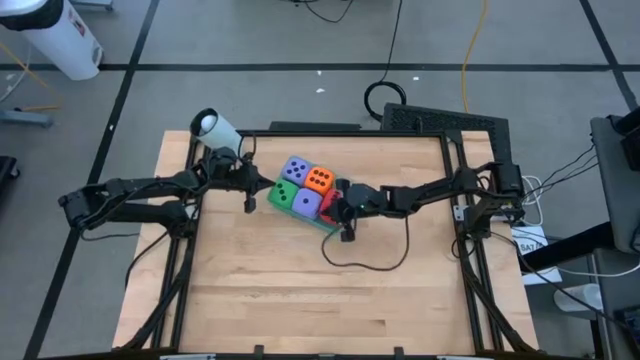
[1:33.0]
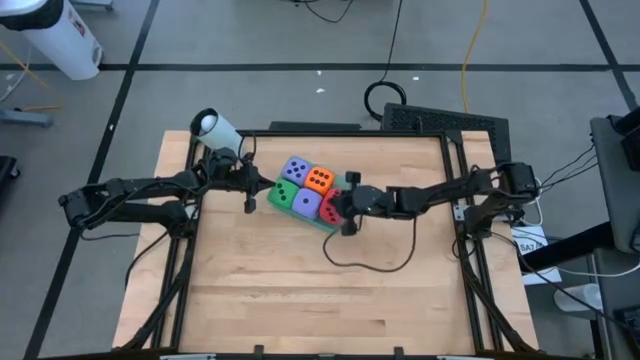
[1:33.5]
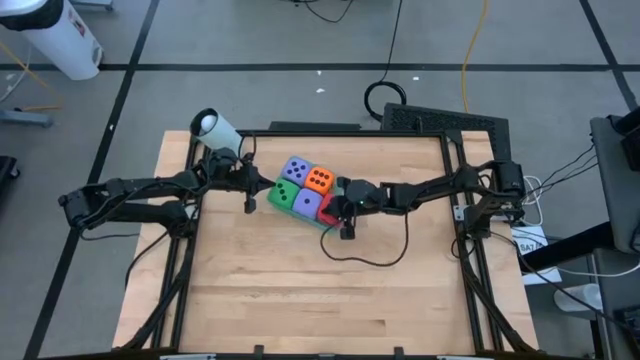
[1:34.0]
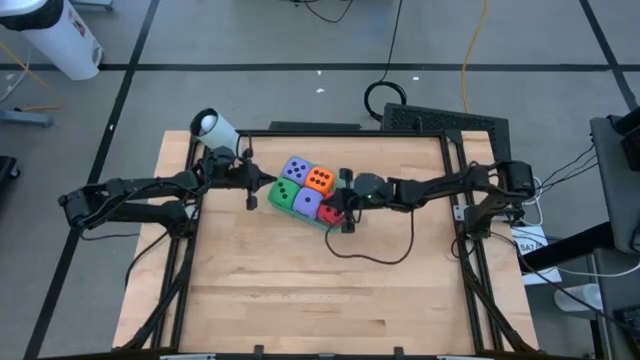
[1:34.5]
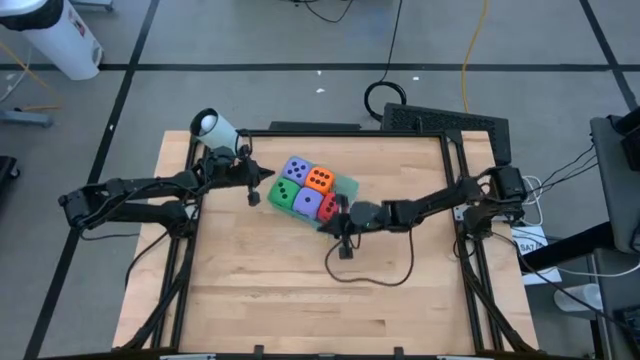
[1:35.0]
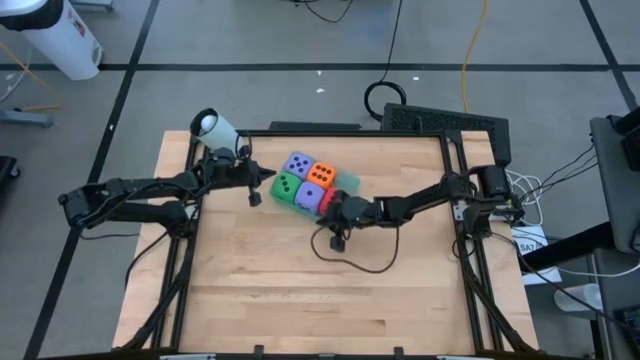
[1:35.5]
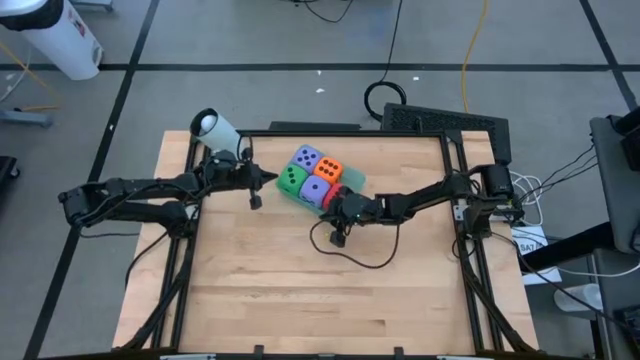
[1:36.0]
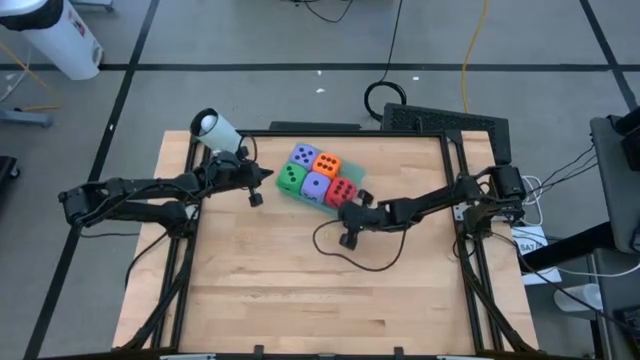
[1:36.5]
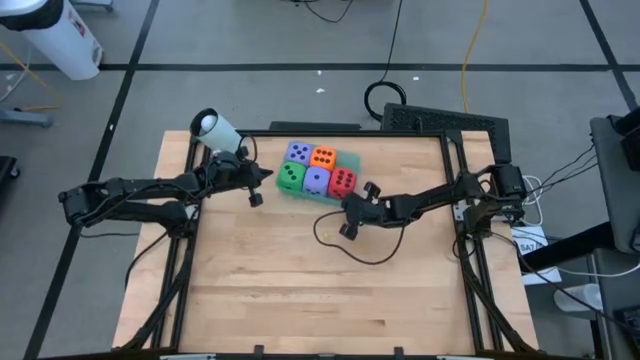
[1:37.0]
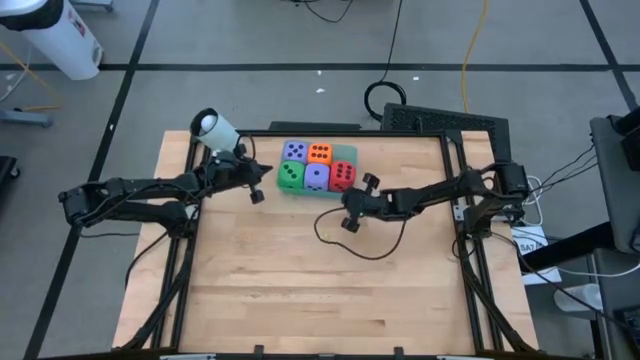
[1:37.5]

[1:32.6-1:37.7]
Task: Pick & Place Dice
Adjust the blue bin

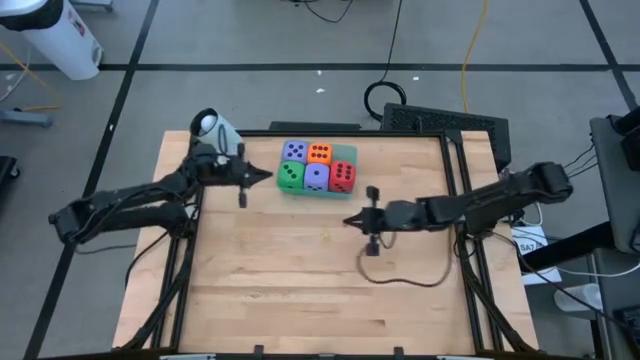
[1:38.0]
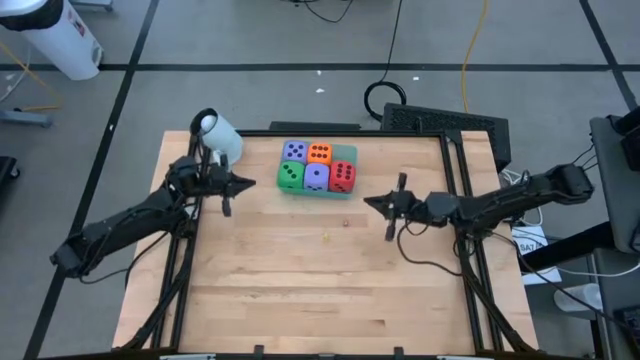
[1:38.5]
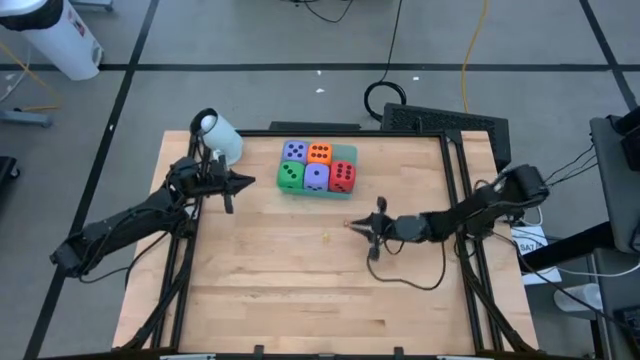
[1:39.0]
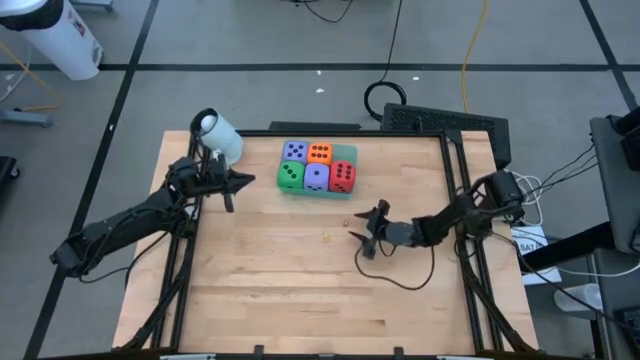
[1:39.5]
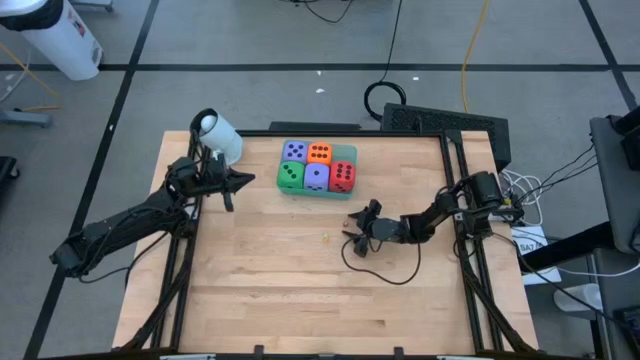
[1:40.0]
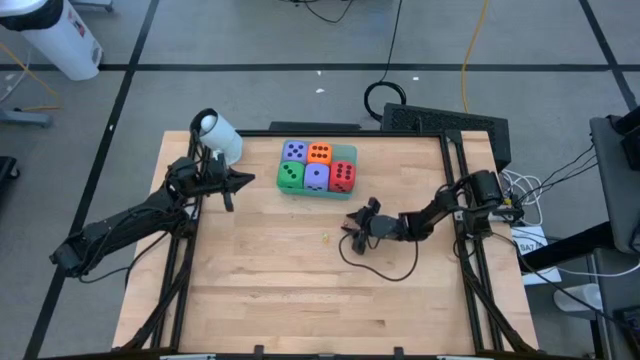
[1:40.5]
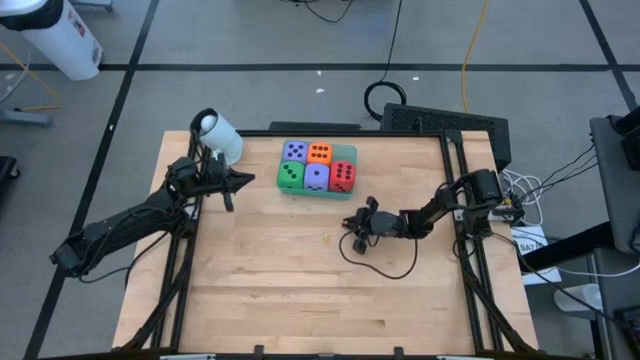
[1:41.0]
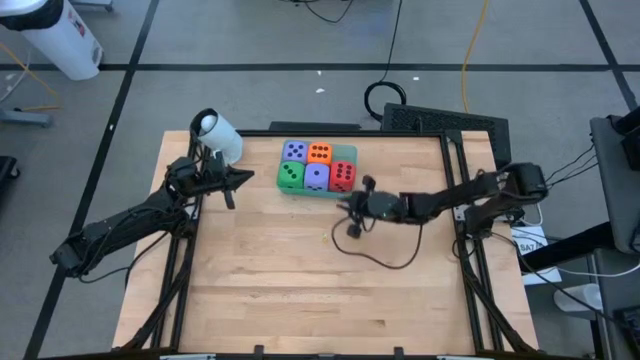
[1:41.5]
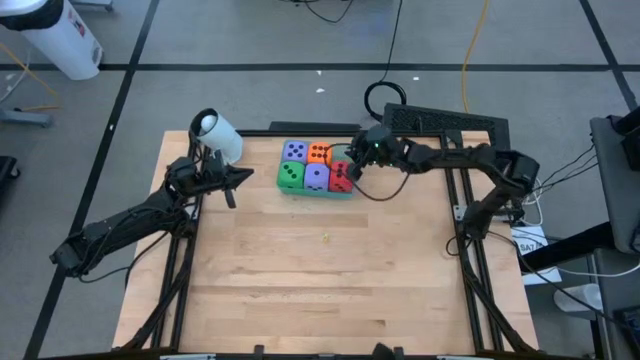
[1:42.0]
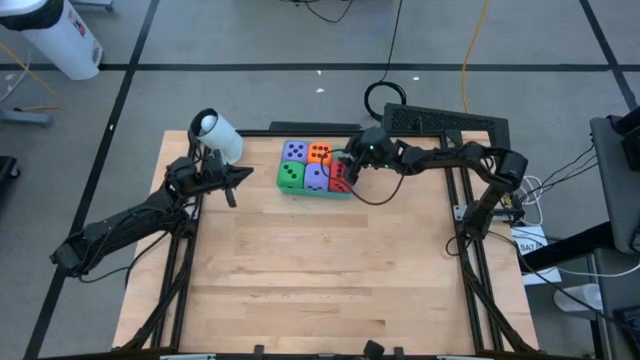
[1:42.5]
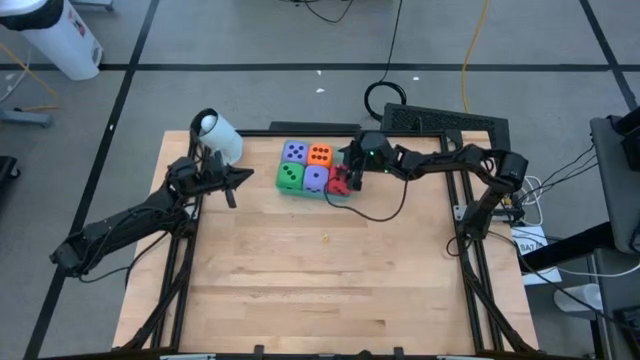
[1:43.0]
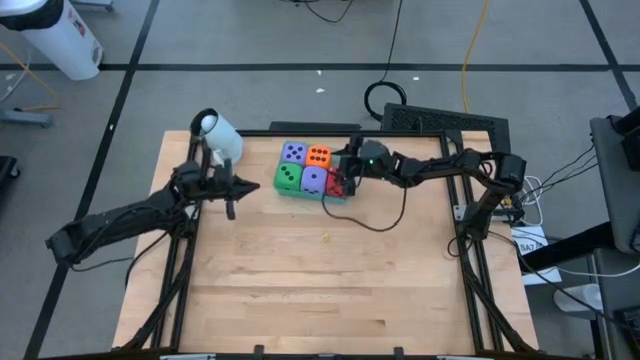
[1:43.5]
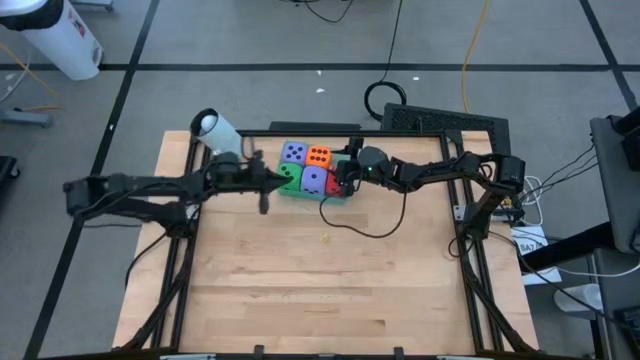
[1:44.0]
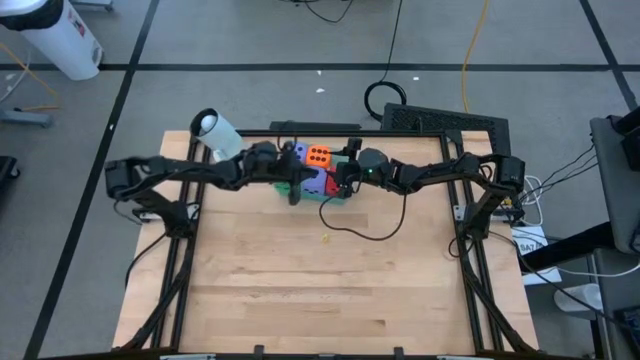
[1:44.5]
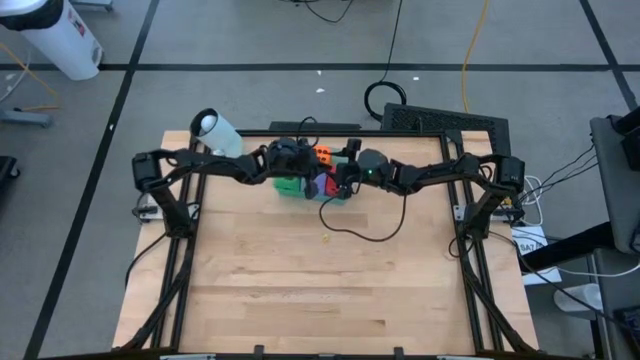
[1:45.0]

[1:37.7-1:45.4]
Put the small red dice into the blue bin

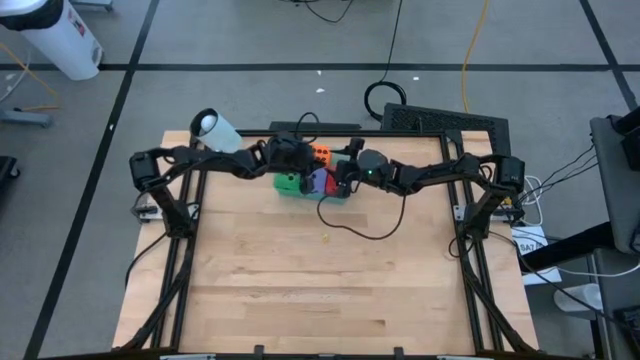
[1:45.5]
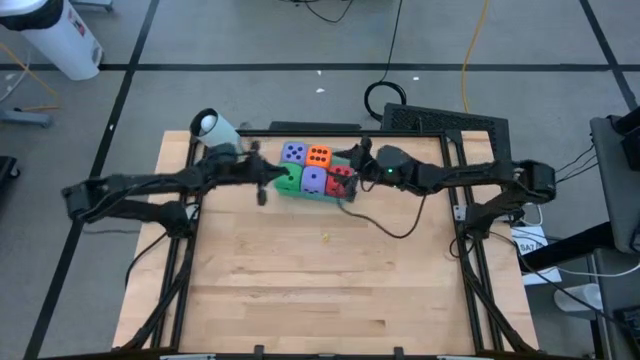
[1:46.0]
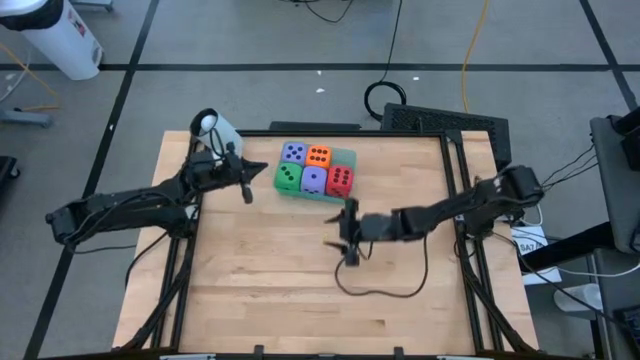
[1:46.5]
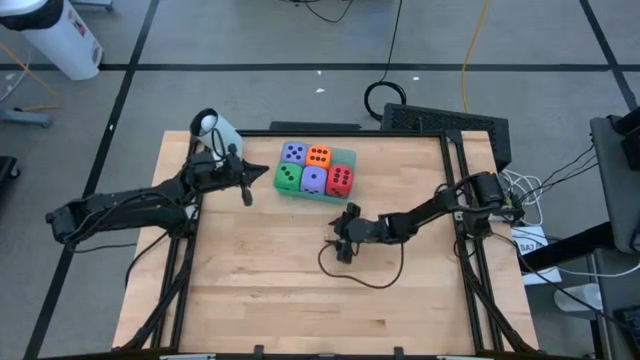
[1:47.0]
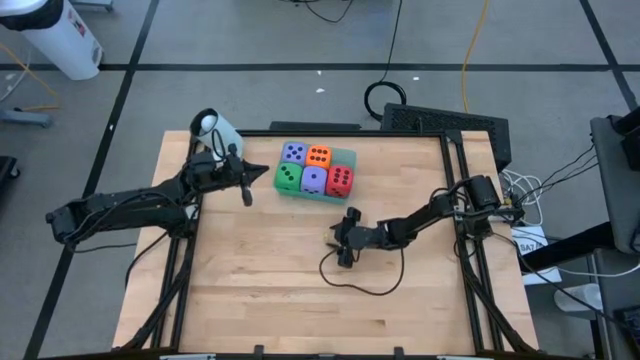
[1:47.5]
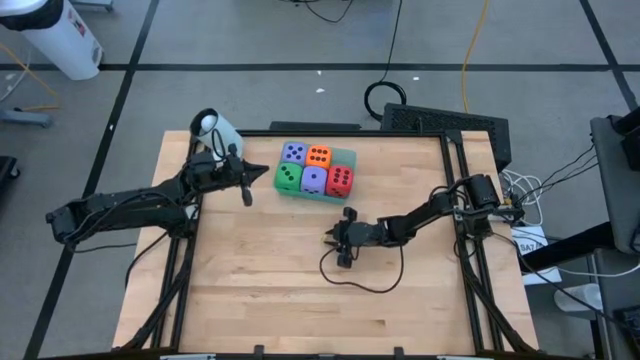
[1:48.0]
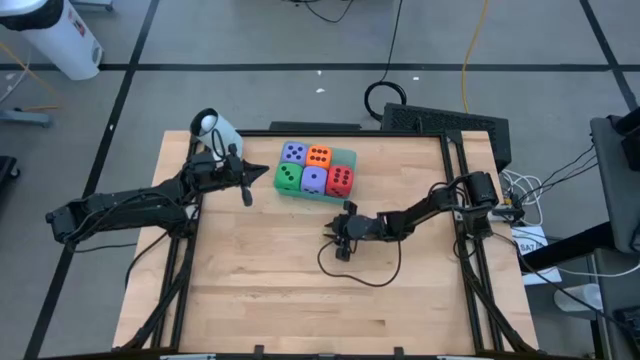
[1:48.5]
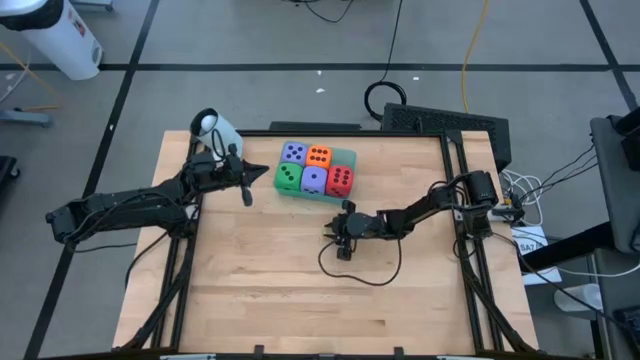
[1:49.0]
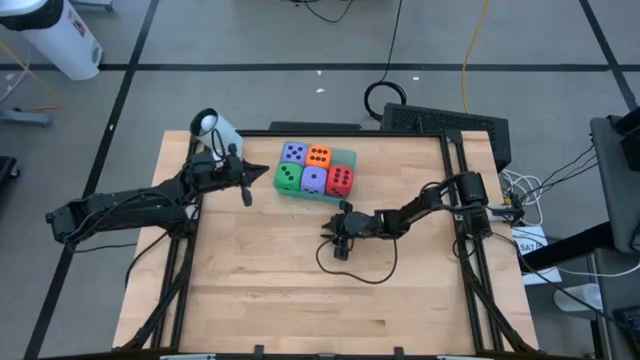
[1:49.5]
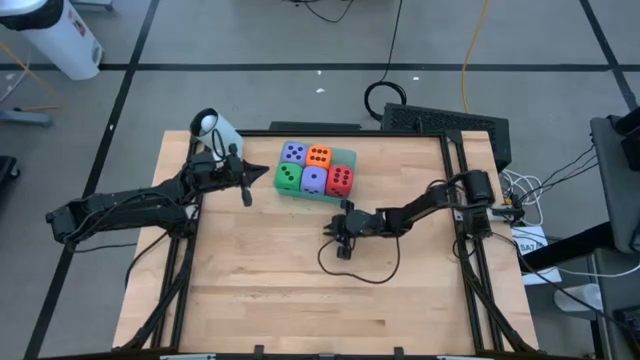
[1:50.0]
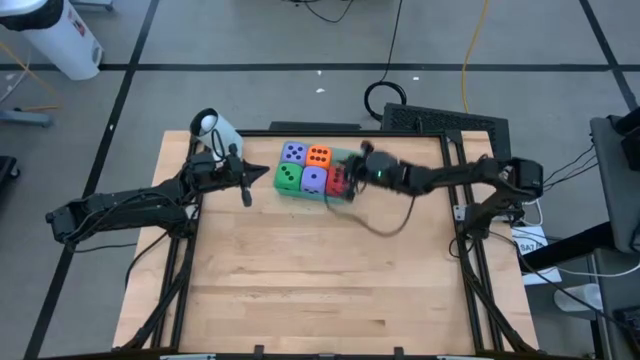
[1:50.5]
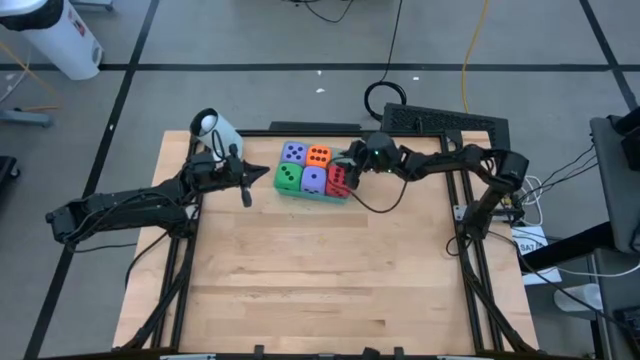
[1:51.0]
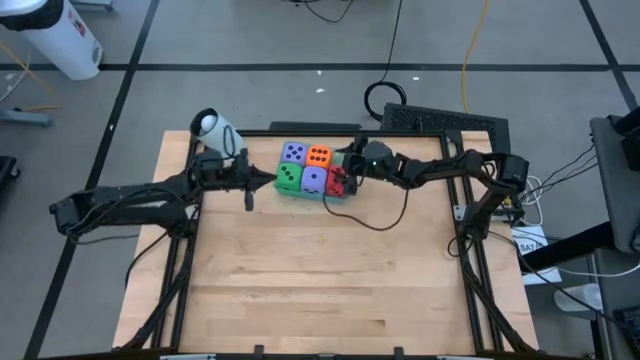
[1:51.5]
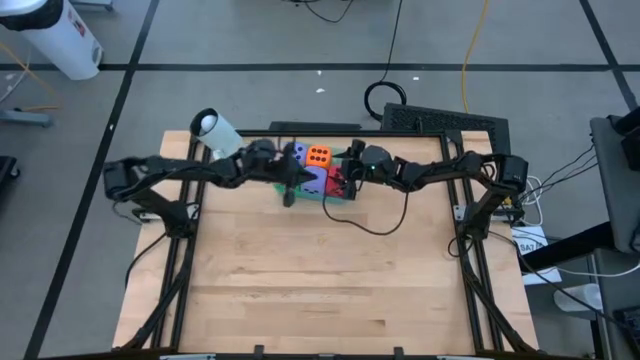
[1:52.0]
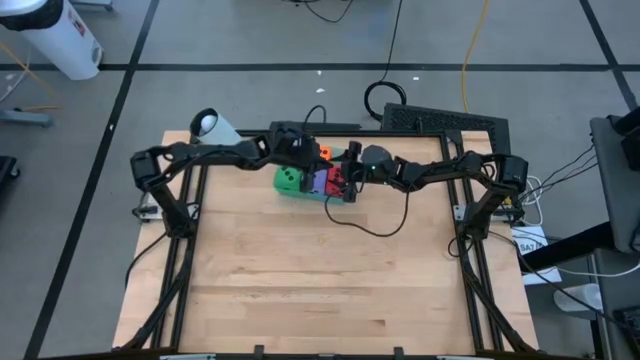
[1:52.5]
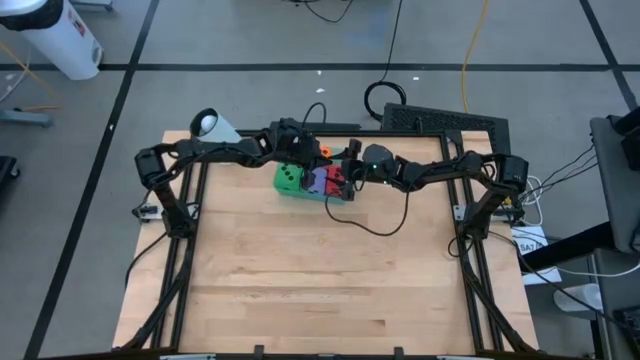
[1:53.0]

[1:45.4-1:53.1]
Put the small green dice into the blue bin

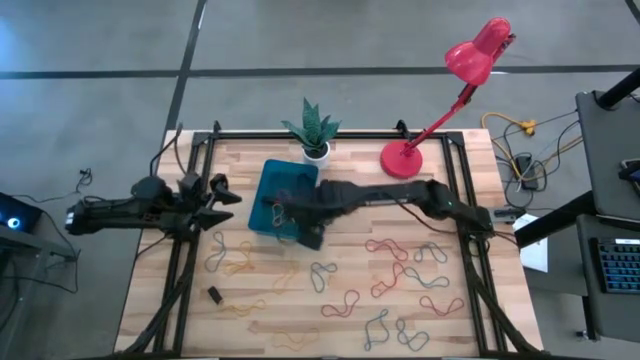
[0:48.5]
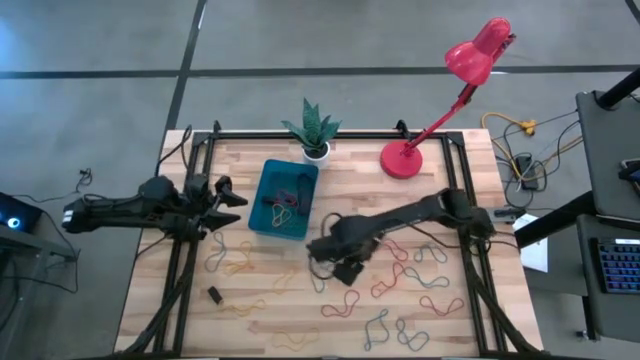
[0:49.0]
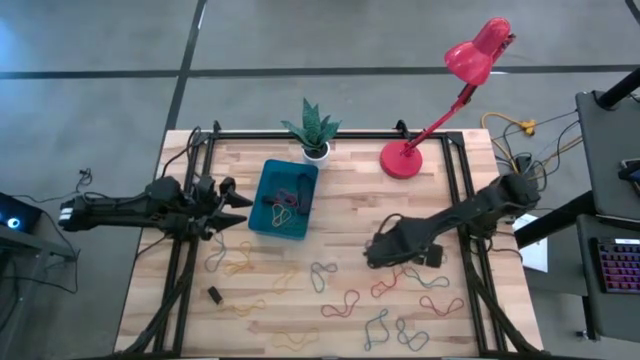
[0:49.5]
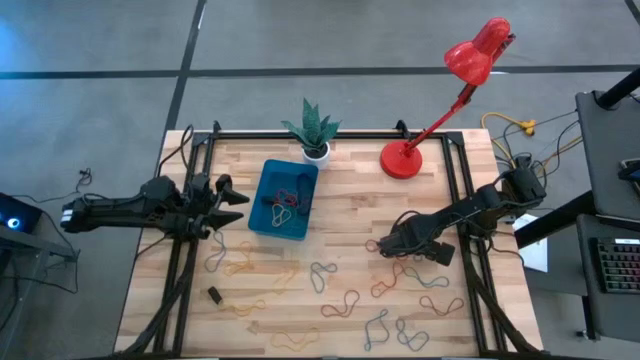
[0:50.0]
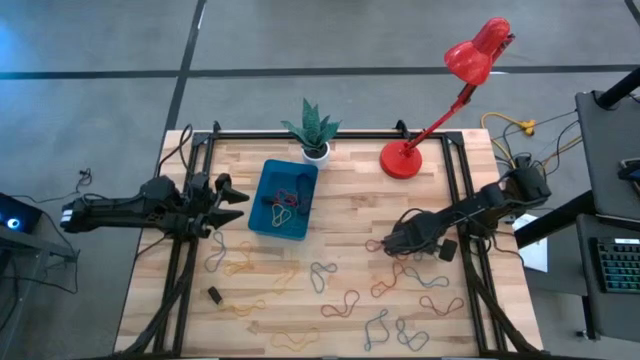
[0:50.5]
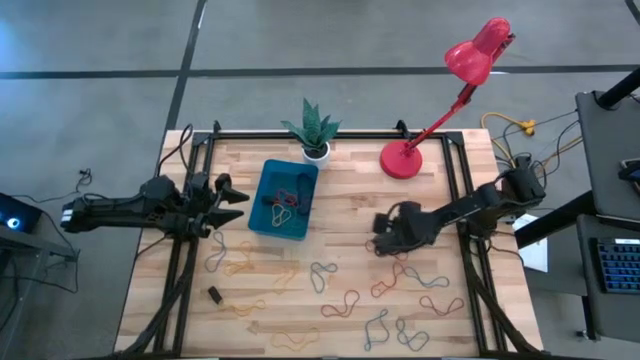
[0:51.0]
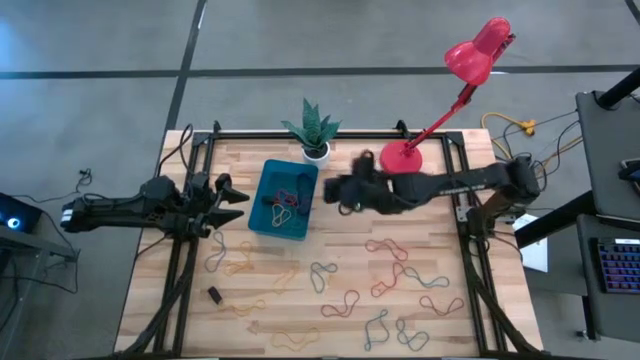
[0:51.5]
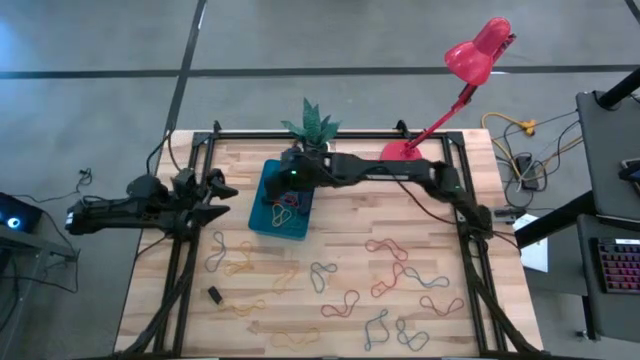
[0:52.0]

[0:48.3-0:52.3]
Task: Pick and place rubber bands into bin
Put the blue rubber band into the blue bin
